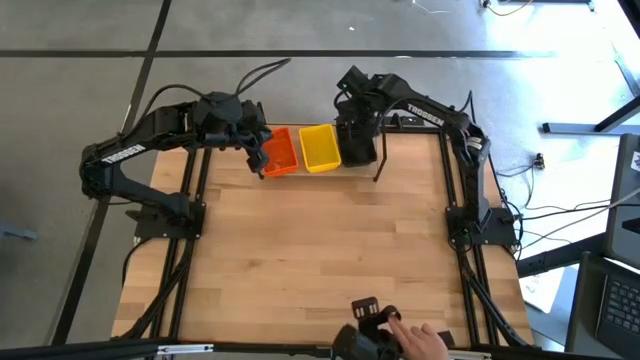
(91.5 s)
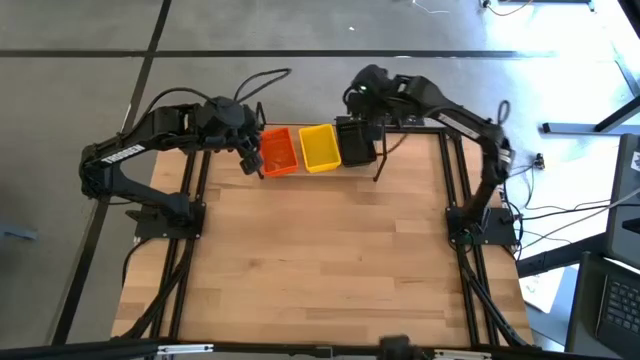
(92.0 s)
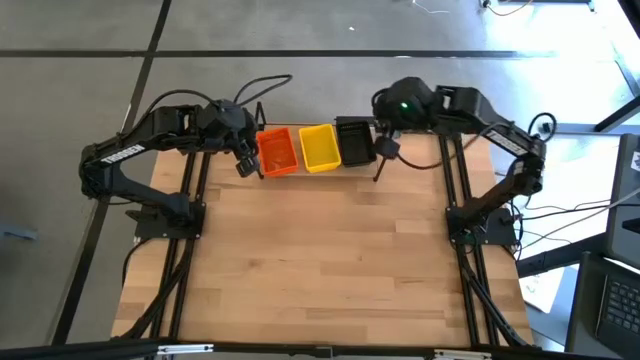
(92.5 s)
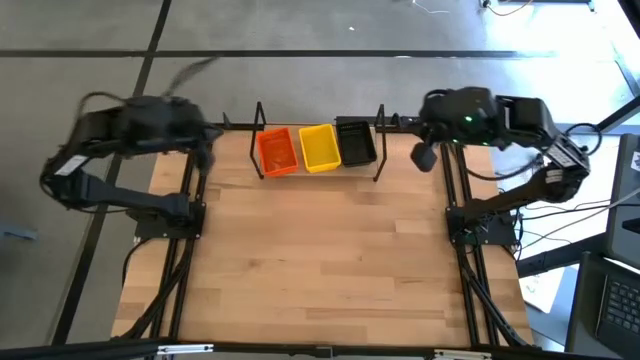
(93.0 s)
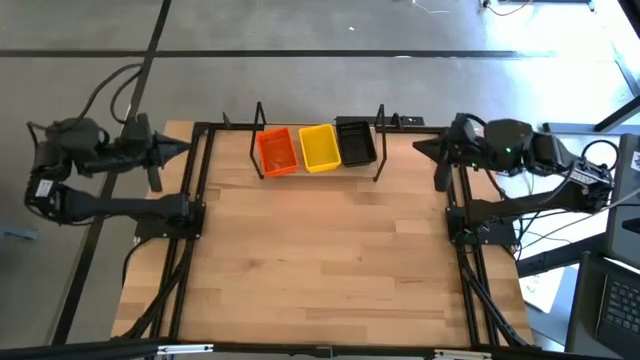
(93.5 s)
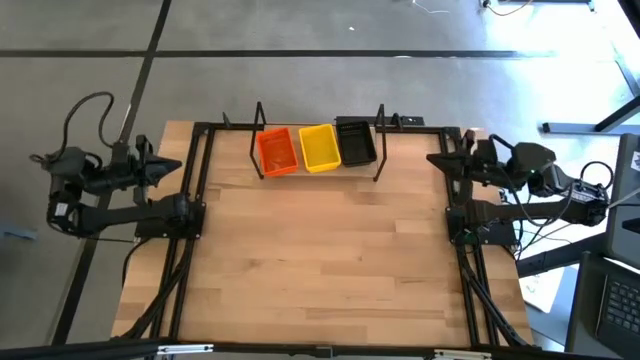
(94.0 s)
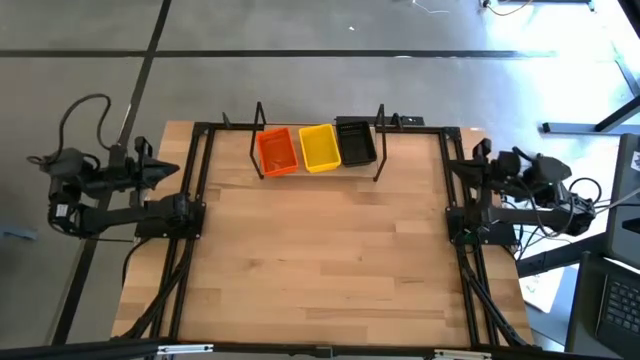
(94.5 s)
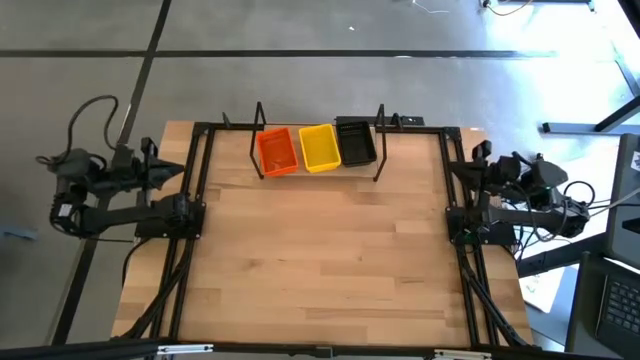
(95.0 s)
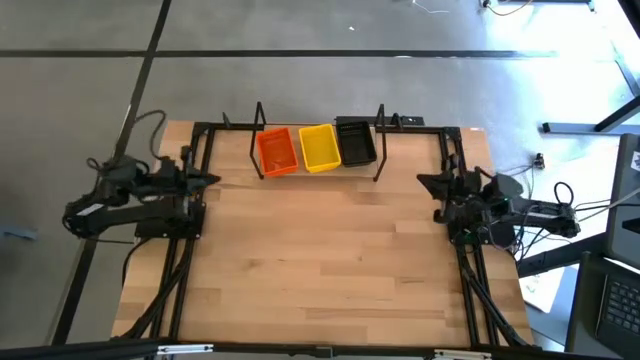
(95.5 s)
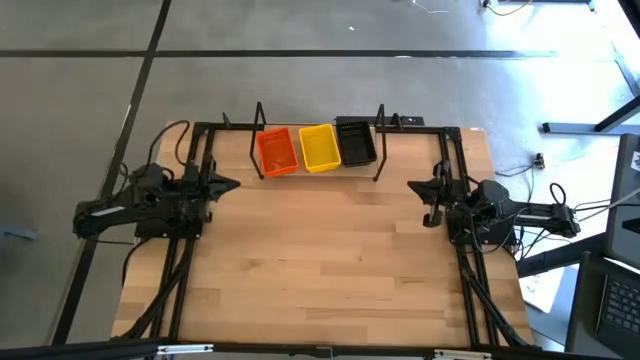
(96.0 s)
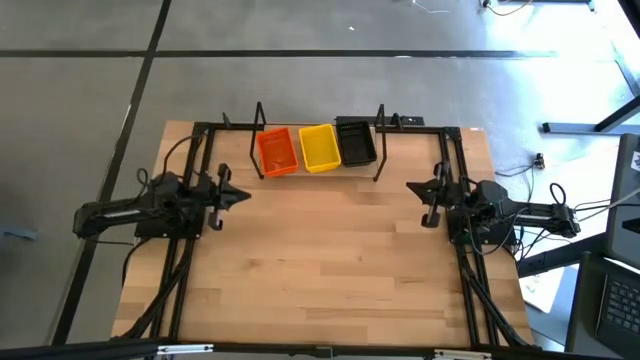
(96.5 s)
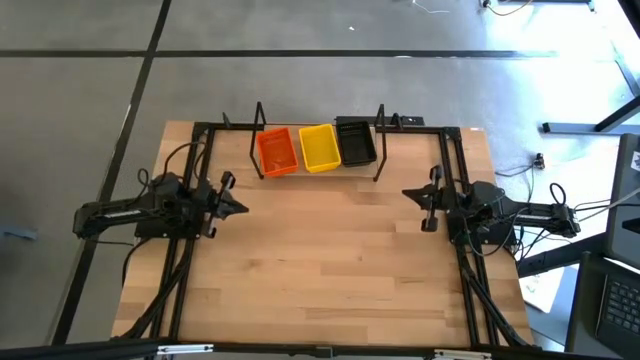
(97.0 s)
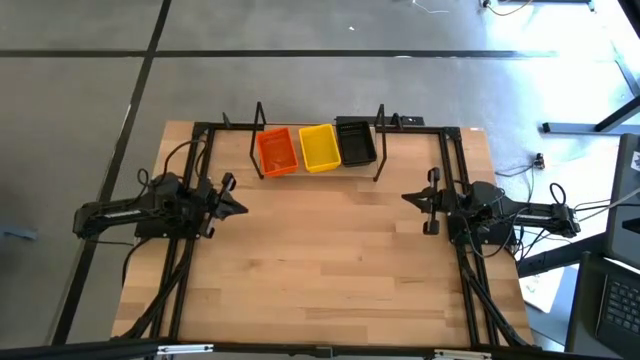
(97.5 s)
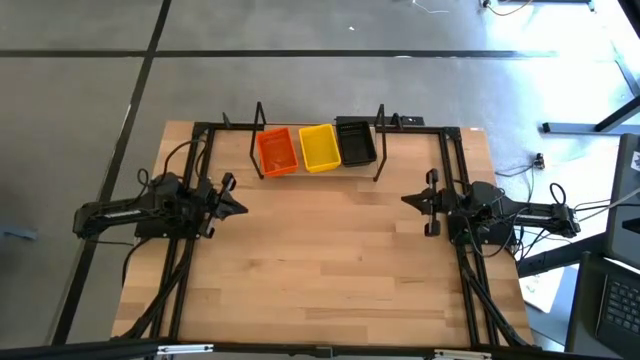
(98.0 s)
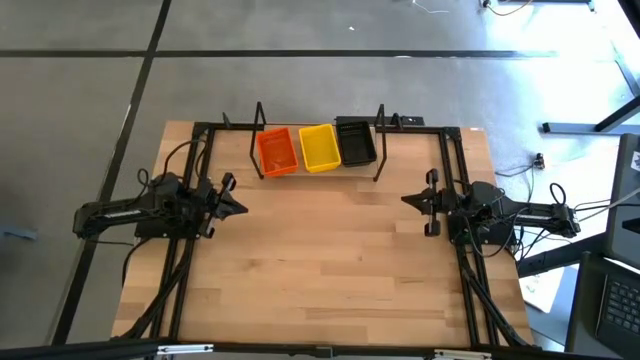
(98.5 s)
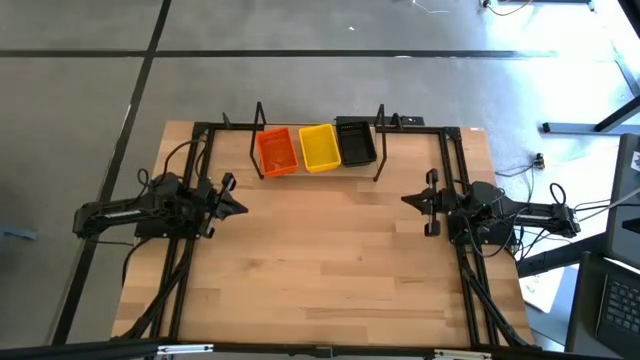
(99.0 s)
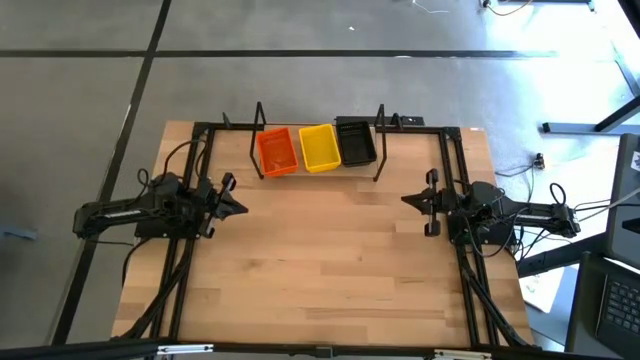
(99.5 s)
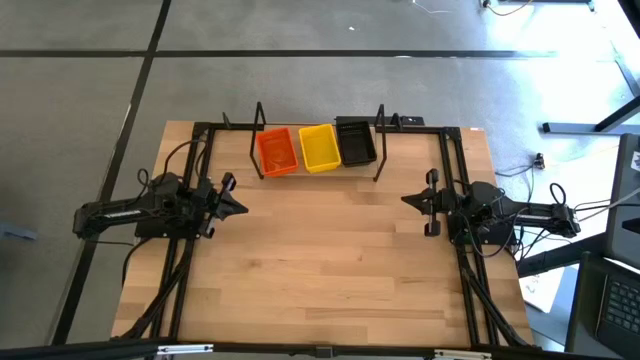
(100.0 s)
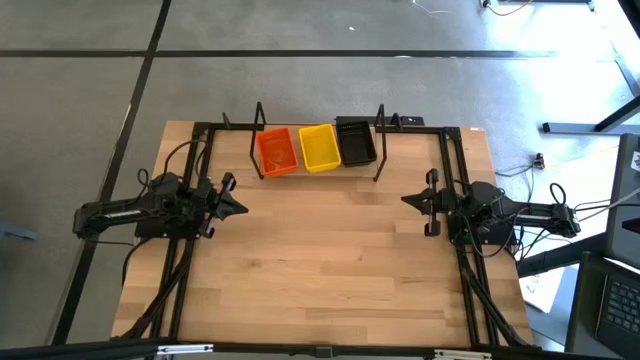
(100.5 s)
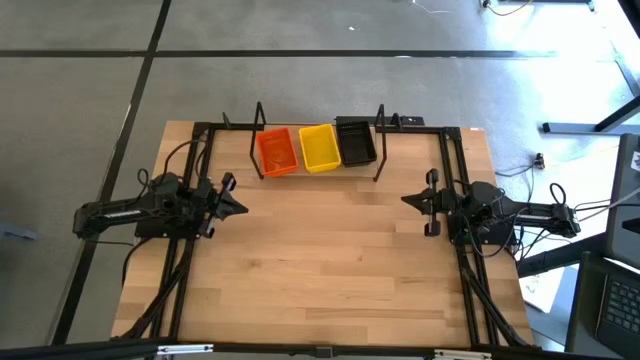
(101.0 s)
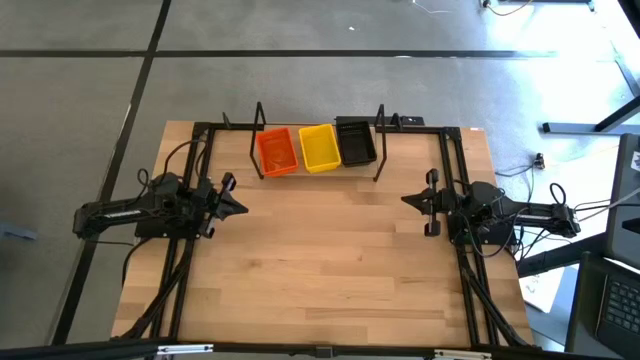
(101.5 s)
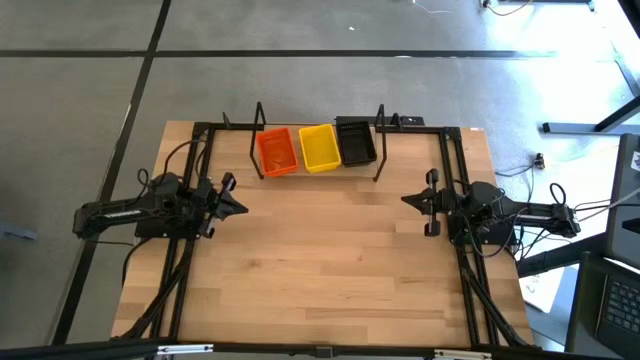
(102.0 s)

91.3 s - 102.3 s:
Task: Stack baskets on shelf by color
Return to Home Position

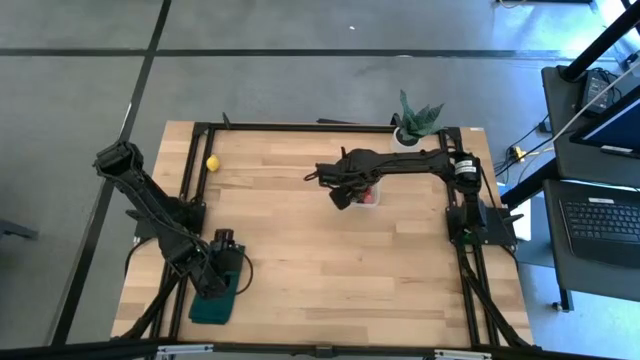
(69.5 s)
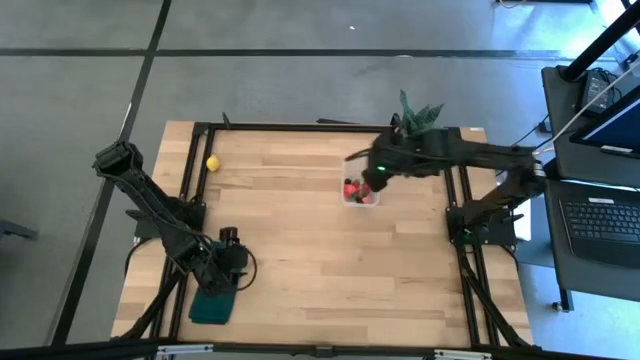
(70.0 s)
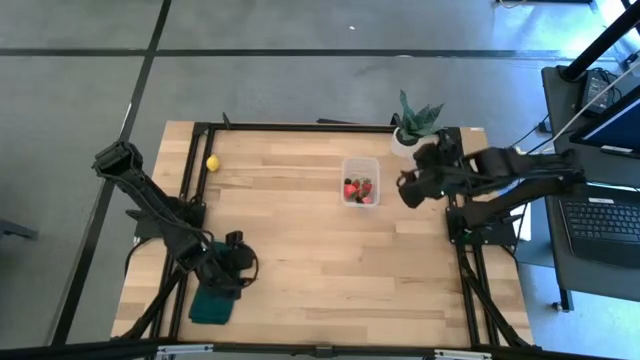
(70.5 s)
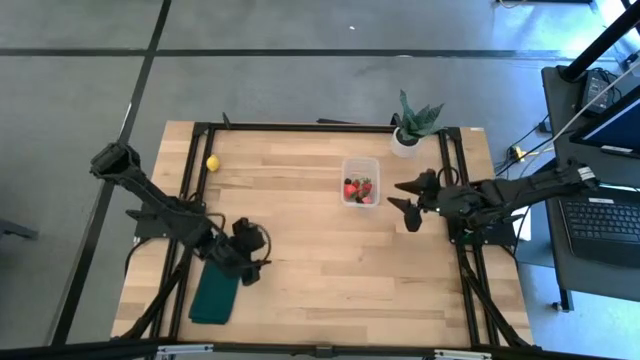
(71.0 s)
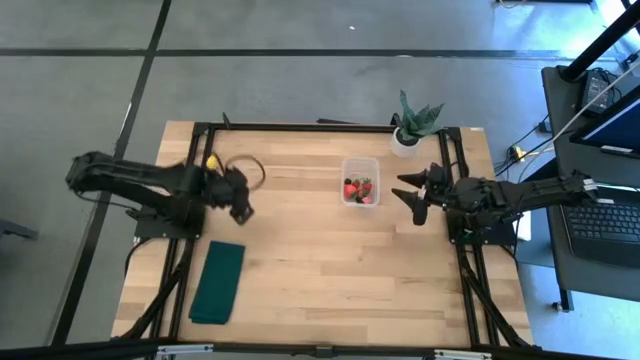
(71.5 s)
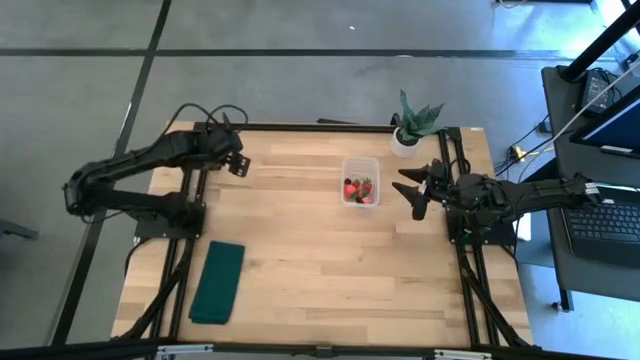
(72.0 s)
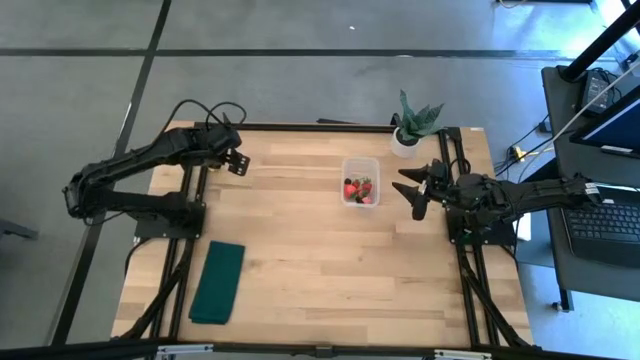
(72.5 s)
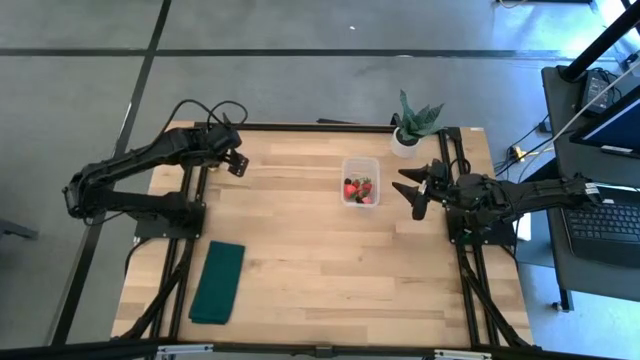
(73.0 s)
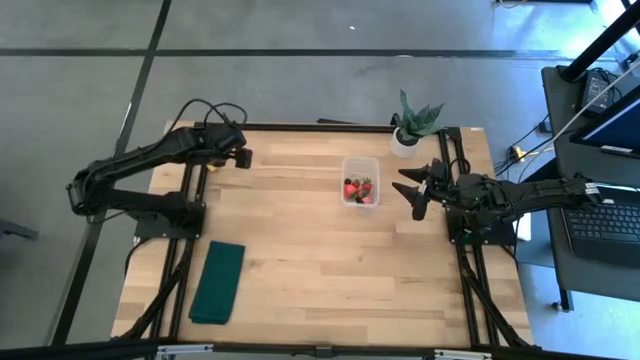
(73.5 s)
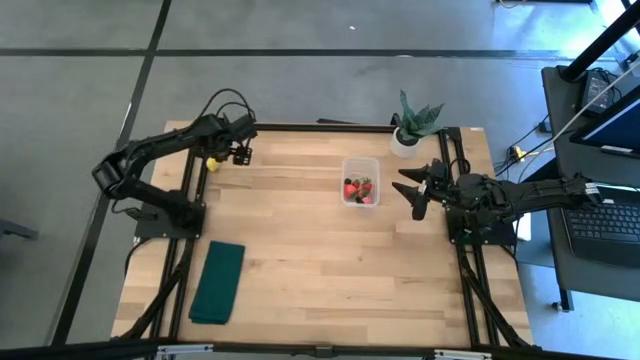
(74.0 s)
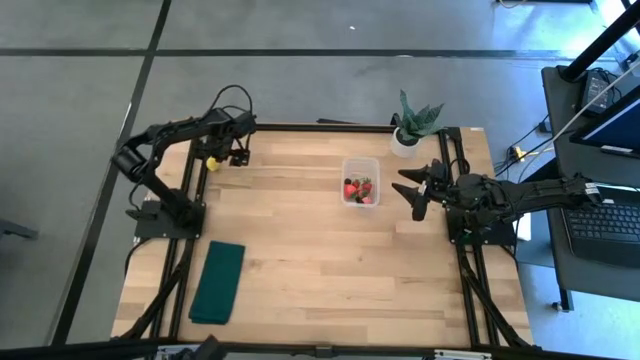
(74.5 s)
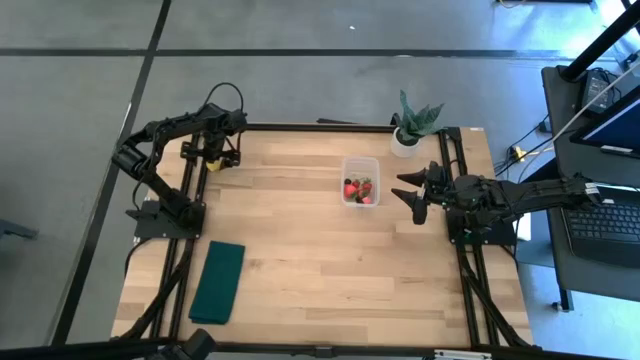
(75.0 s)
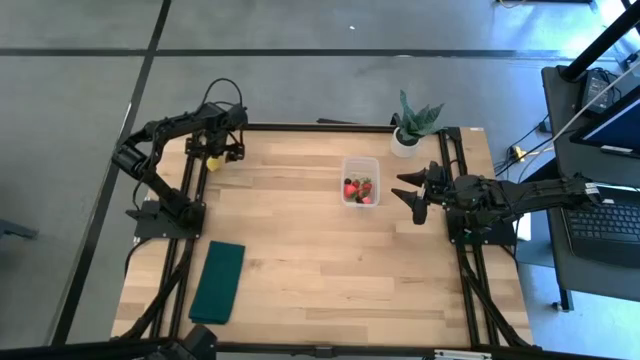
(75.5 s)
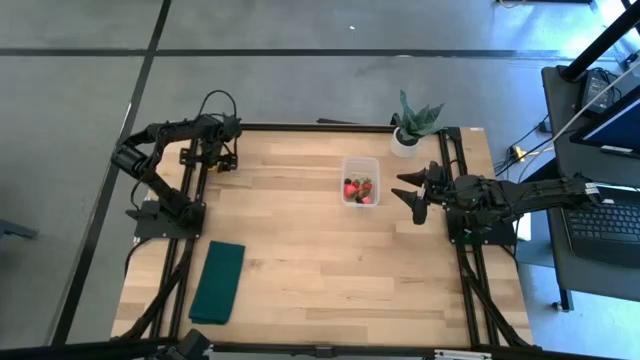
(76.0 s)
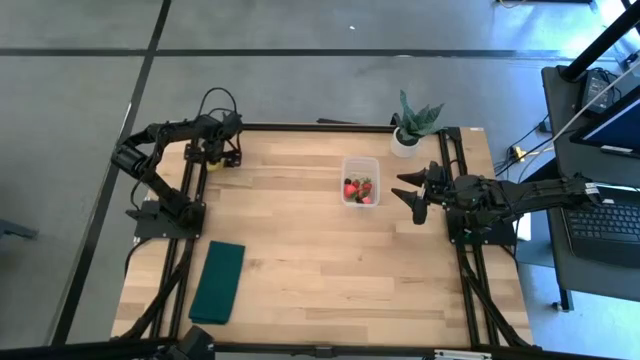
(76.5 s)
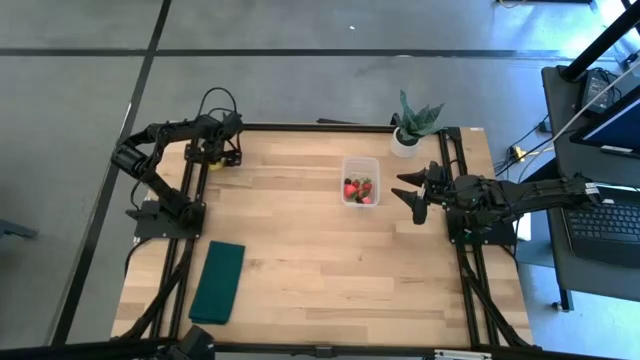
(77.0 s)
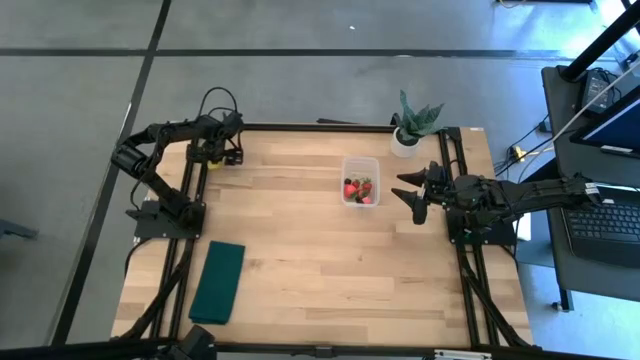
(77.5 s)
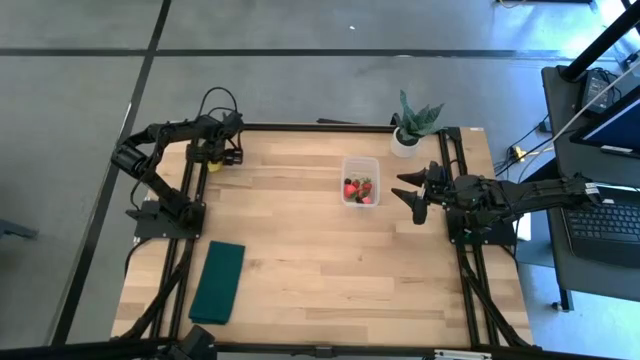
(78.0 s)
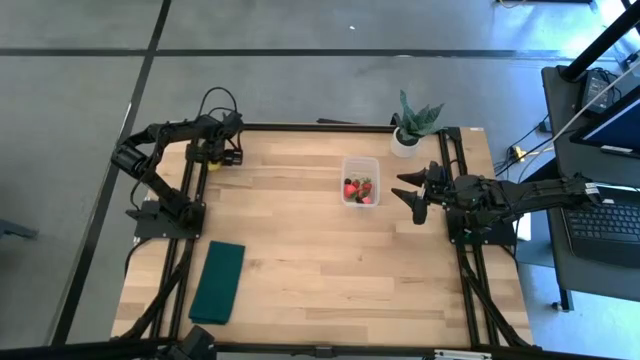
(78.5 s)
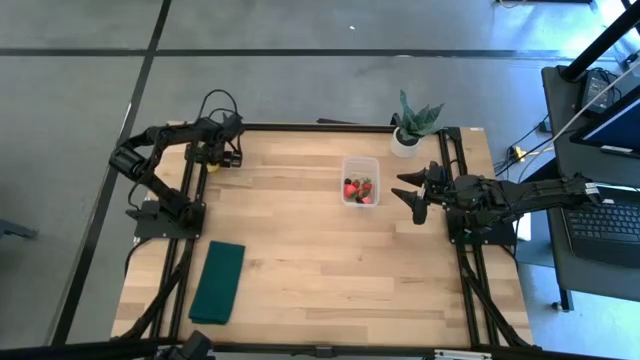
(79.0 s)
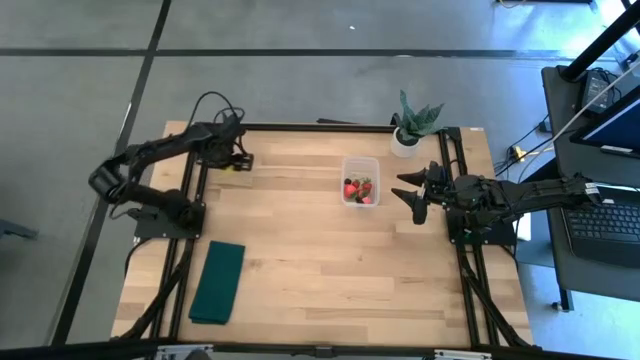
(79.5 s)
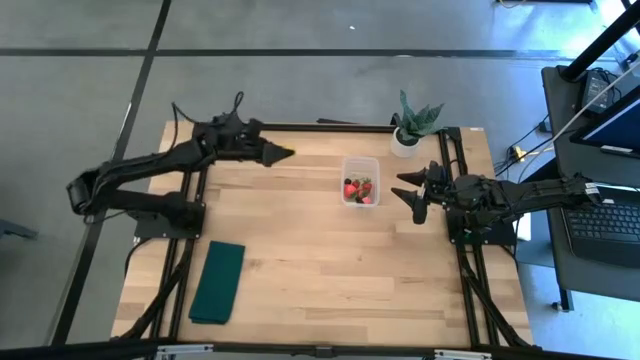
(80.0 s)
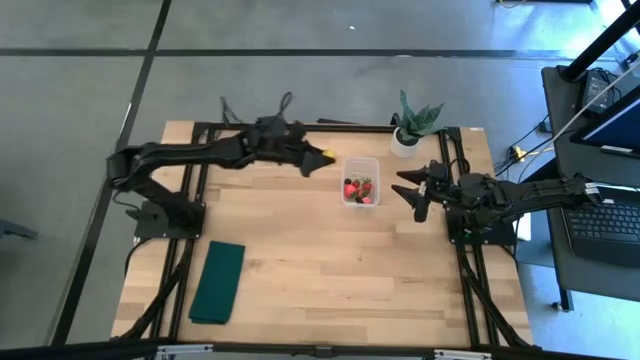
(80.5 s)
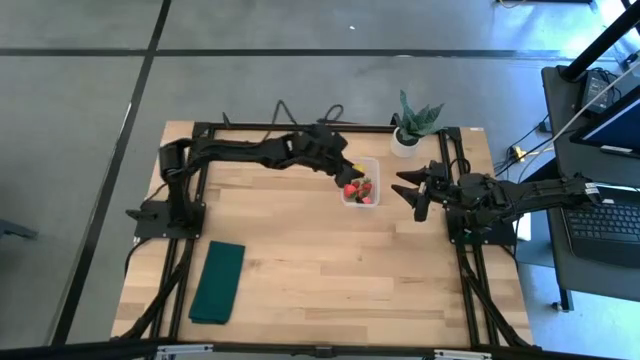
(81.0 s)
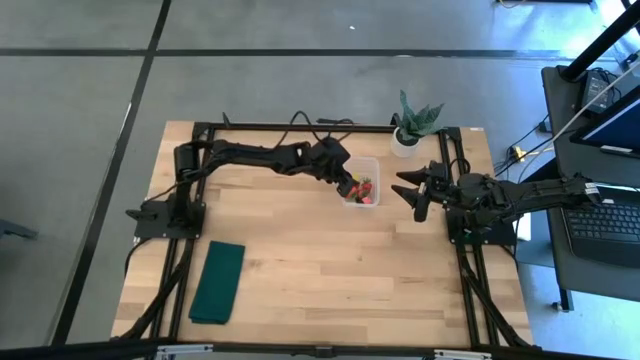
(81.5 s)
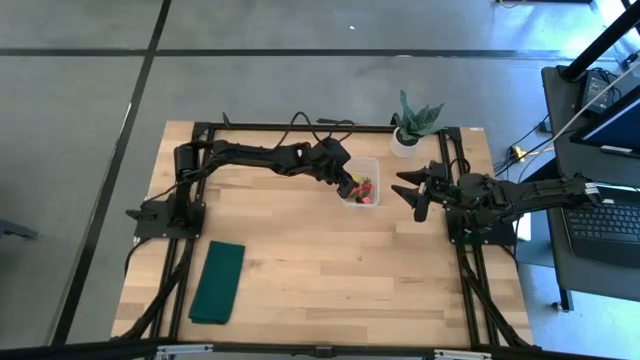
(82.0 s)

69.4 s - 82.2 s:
Task: Pick and placing Produce into tupperware
Put the yellow lemon into the transparent container
